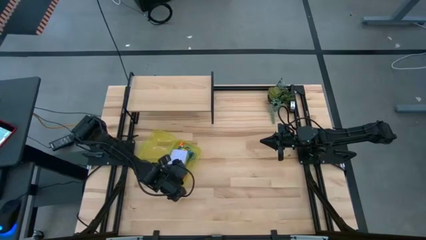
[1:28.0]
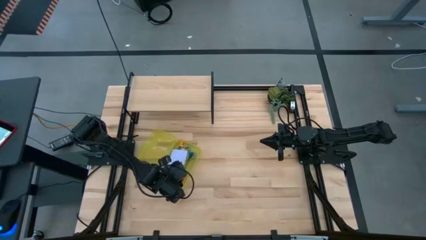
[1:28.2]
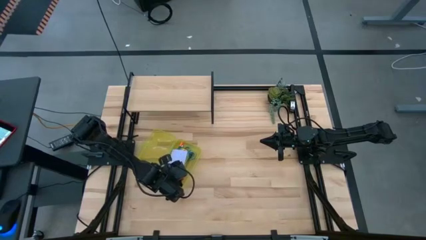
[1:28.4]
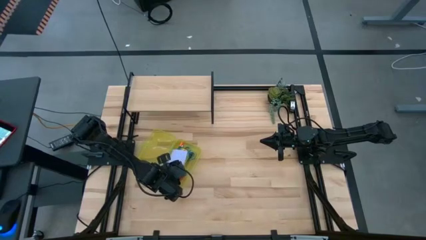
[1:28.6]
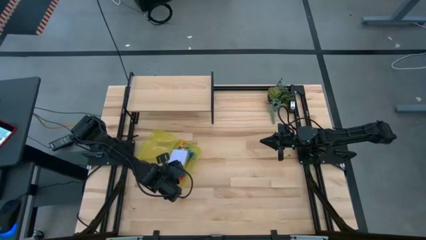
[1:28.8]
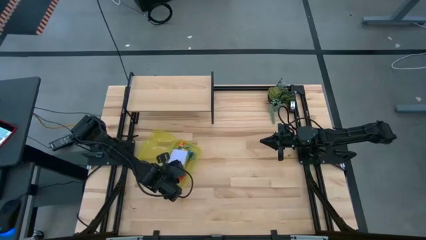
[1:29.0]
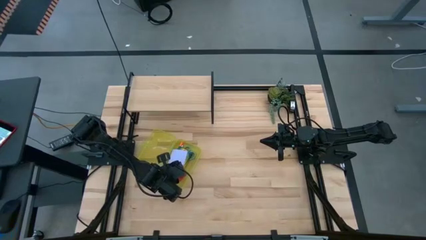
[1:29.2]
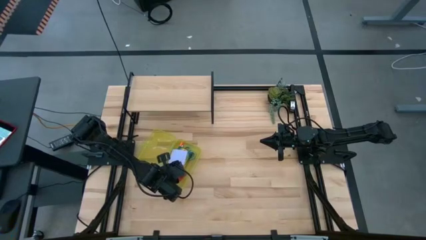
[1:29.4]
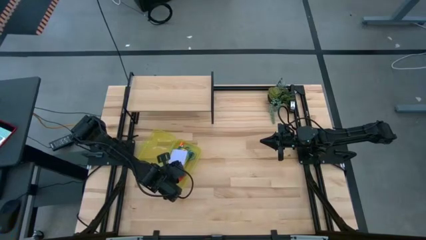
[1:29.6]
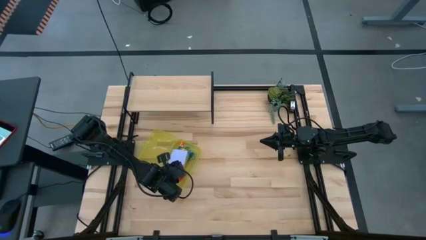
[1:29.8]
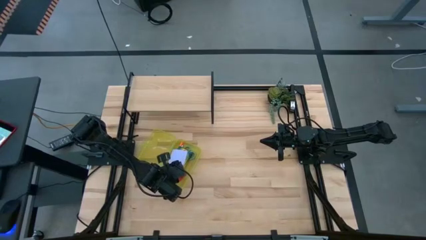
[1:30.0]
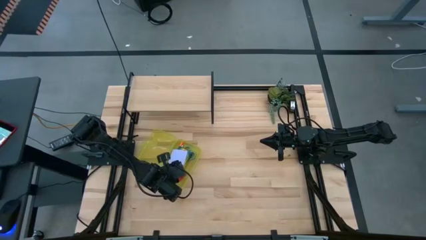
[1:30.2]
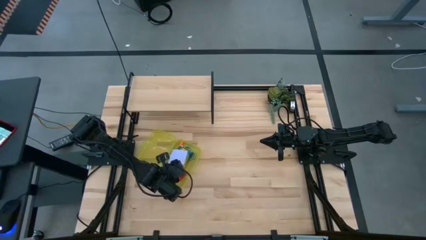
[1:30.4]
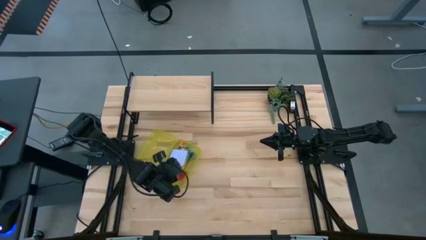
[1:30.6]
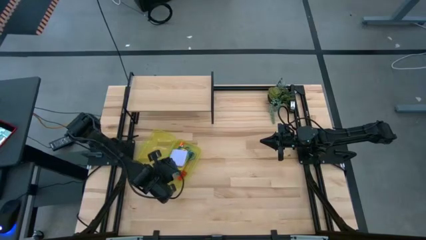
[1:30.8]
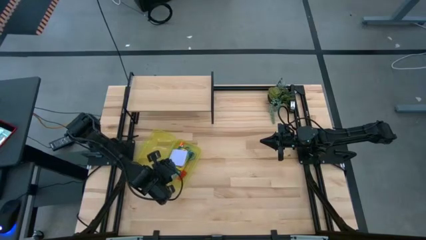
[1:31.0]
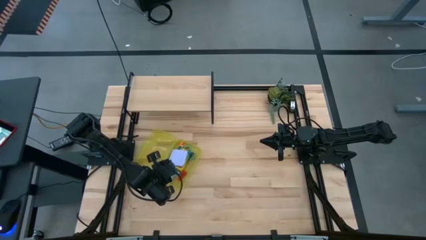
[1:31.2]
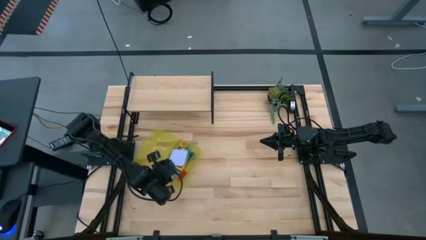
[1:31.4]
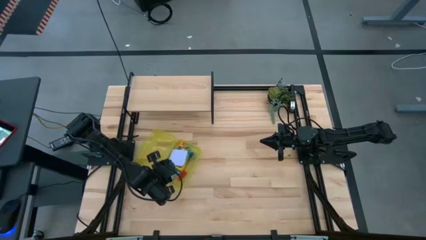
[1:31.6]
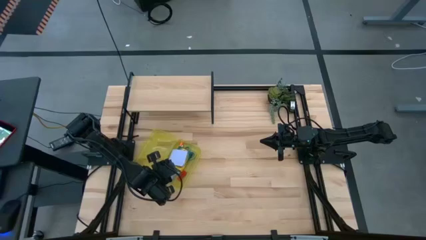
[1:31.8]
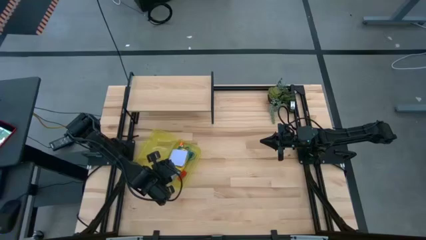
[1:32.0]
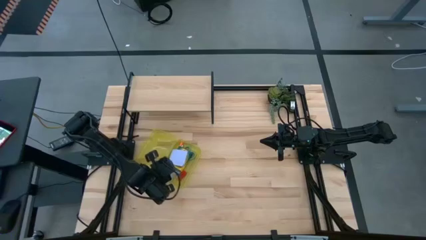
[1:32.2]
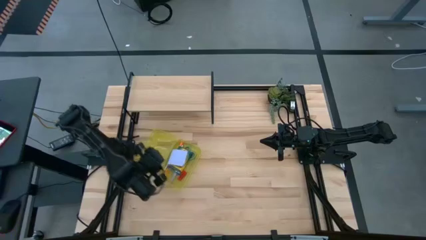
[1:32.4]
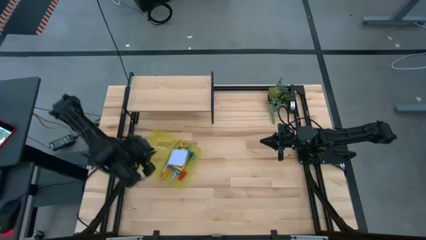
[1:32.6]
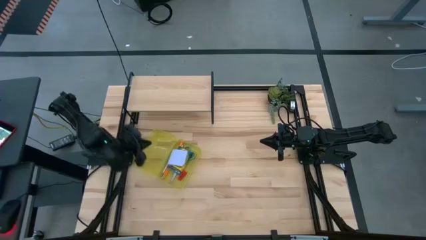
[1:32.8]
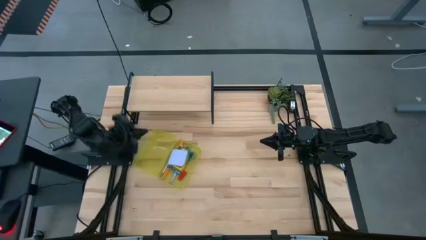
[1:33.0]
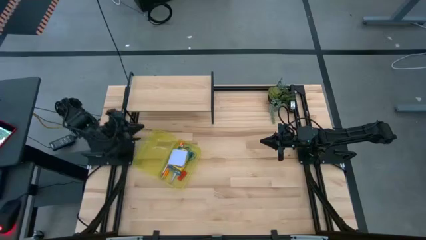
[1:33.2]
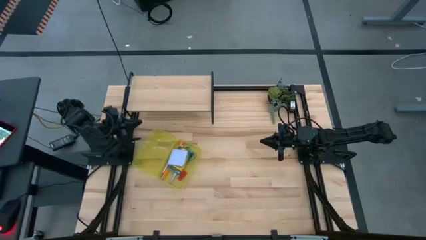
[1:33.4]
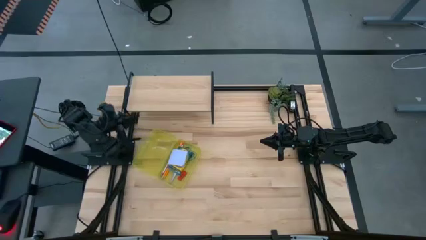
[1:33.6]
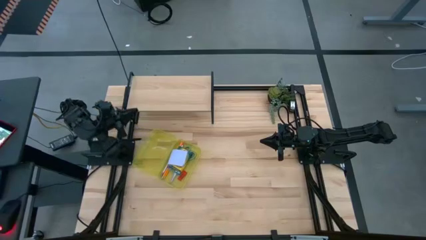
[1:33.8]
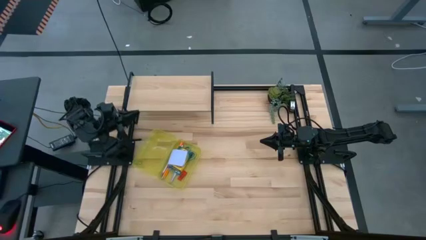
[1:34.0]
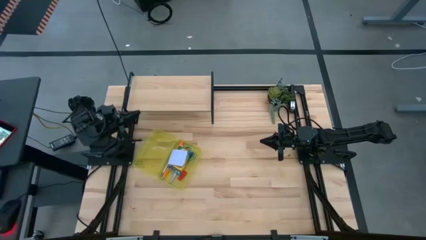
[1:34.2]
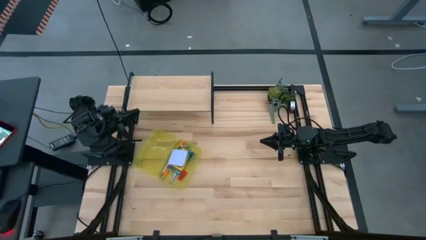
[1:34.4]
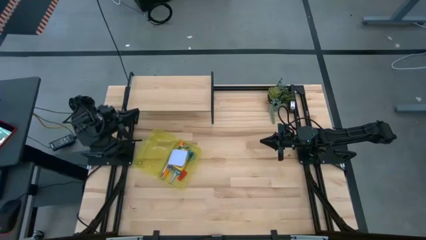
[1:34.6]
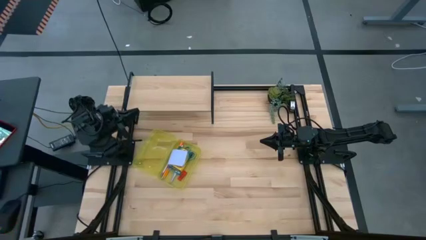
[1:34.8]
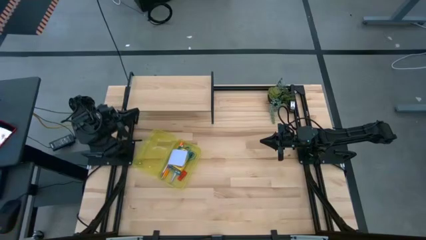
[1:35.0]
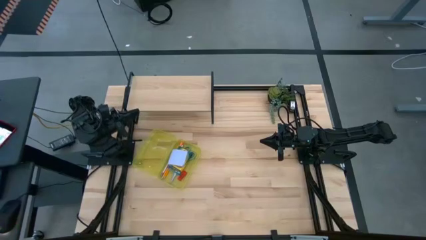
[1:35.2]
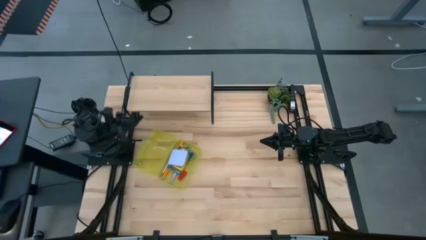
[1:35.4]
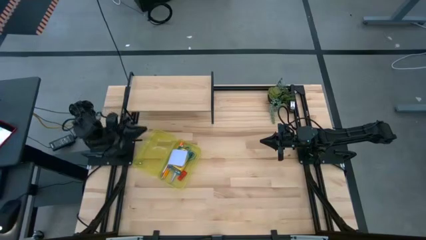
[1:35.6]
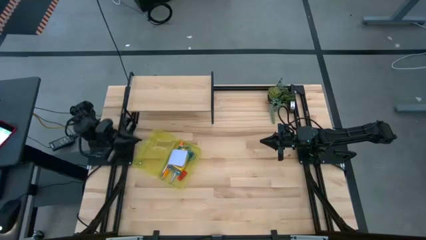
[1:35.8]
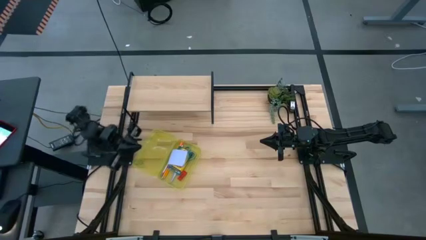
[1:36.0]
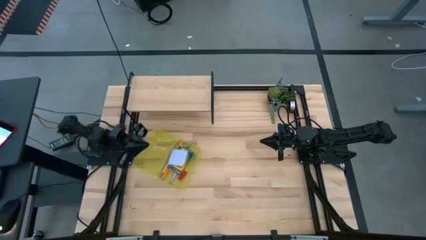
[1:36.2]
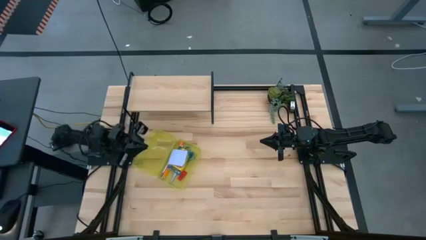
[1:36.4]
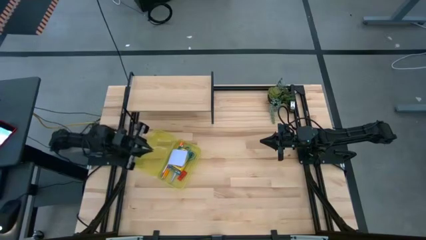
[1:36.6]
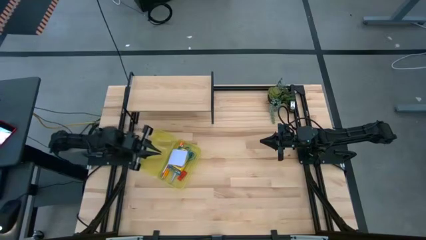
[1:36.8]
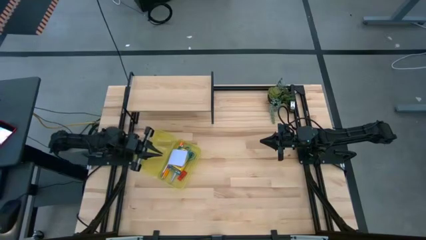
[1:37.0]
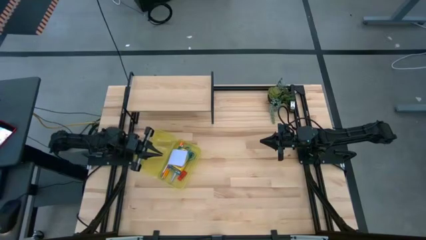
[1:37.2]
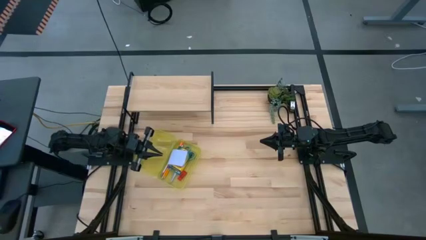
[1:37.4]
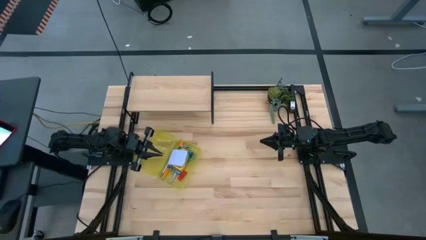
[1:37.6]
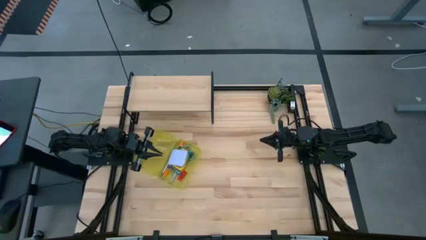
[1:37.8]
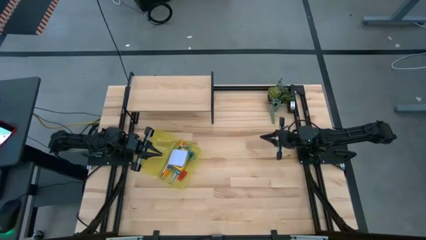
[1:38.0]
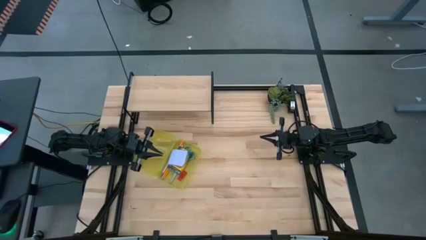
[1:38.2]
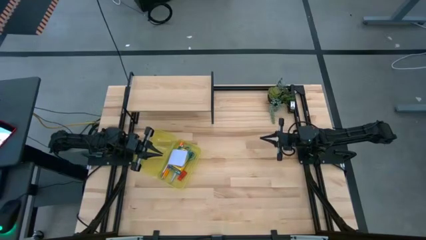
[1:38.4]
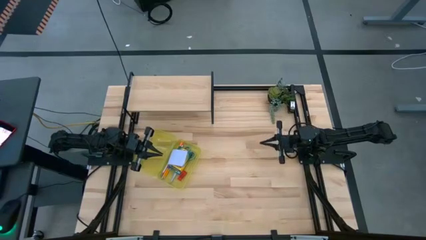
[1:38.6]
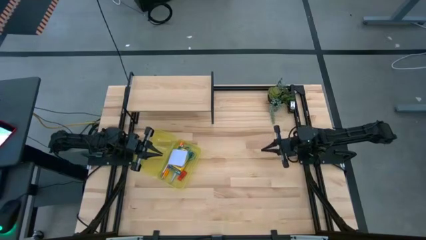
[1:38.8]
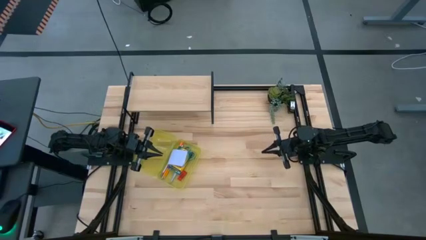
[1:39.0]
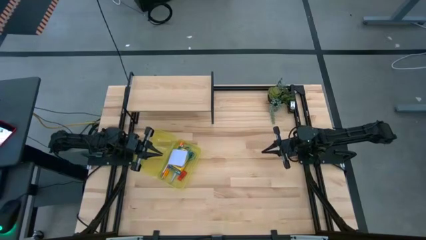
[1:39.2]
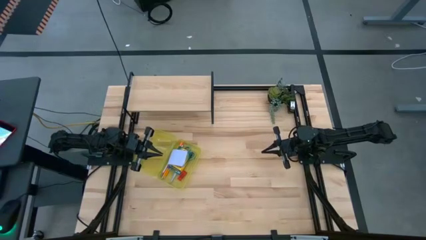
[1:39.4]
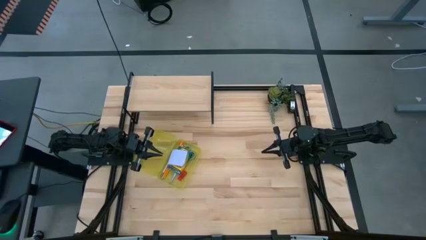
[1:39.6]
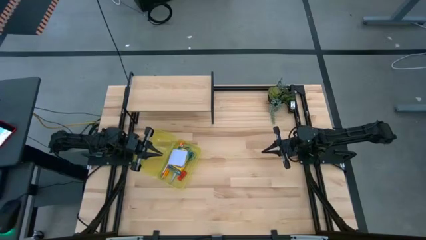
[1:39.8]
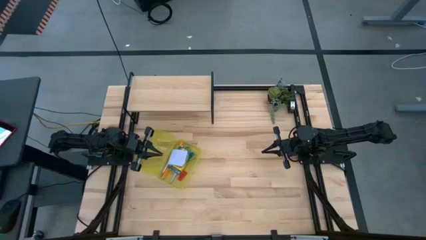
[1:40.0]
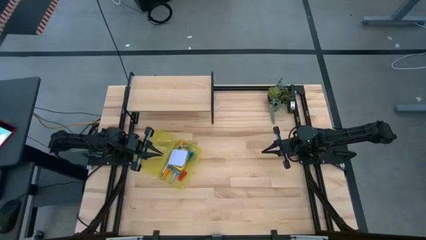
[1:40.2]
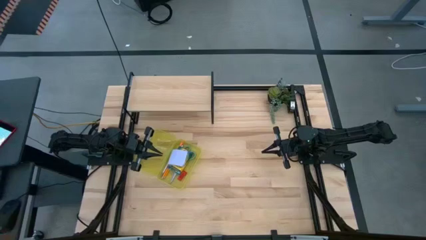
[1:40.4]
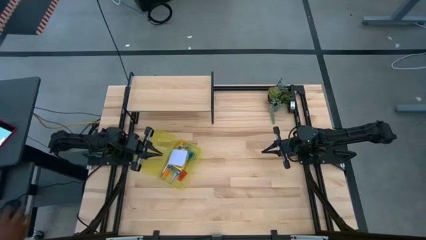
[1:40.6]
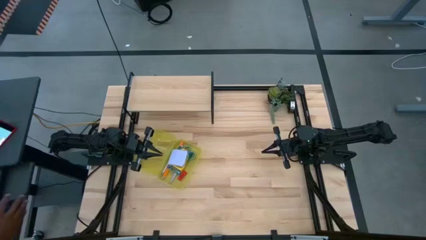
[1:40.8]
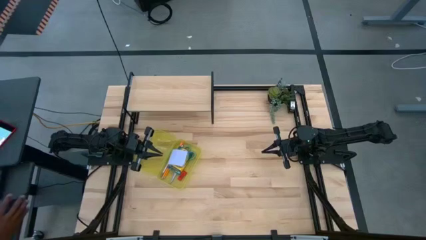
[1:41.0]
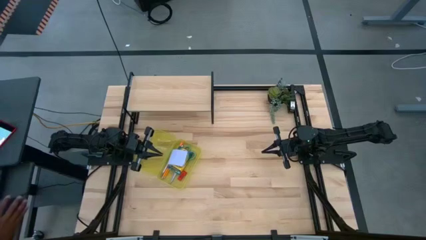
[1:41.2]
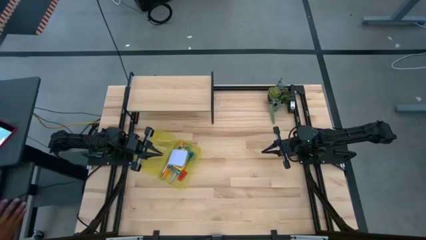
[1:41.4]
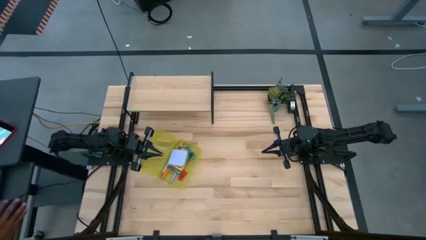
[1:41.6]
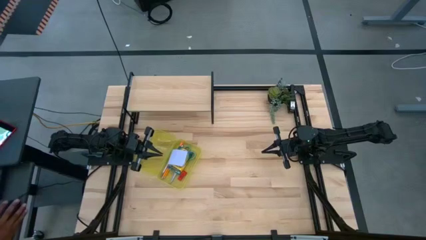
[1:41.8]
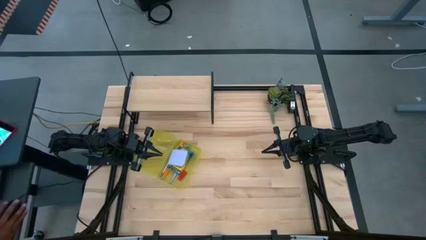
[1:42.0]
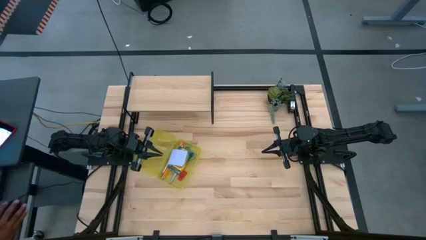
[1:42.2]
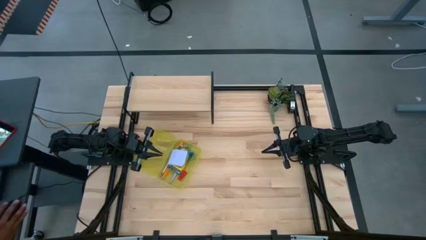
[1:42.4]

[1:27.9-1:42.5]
Task: Pack school essentials
Return to Home Position
